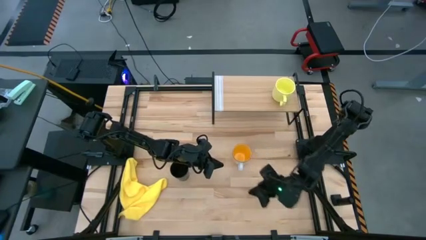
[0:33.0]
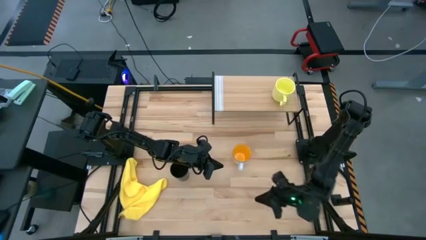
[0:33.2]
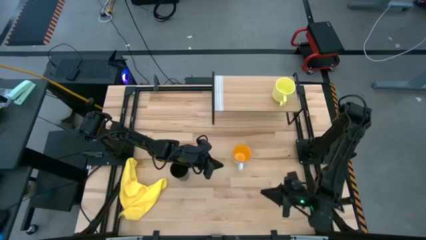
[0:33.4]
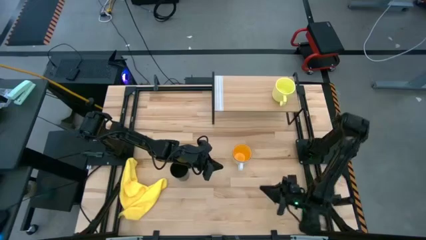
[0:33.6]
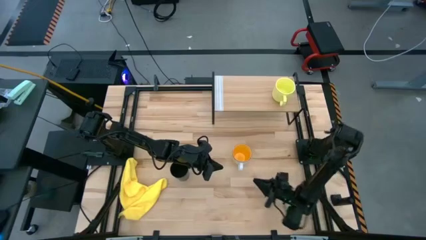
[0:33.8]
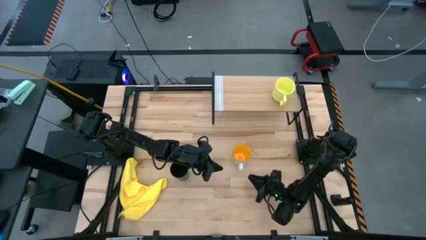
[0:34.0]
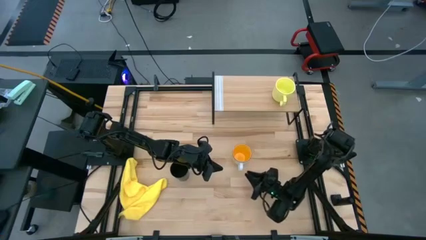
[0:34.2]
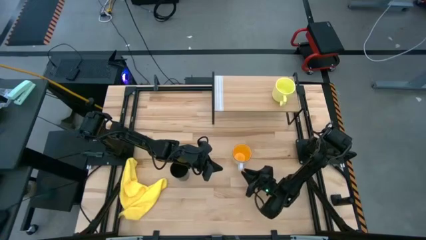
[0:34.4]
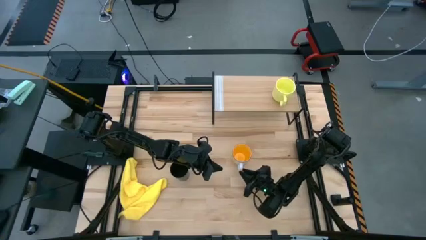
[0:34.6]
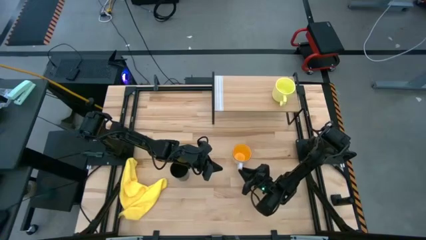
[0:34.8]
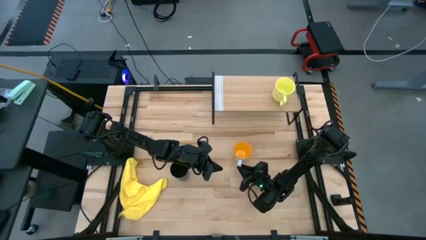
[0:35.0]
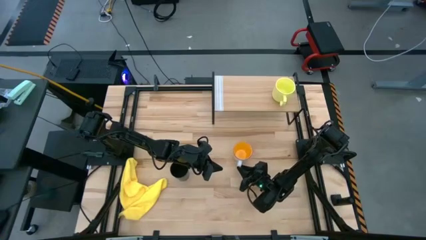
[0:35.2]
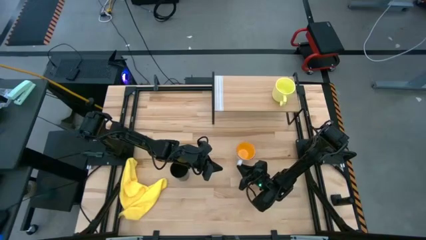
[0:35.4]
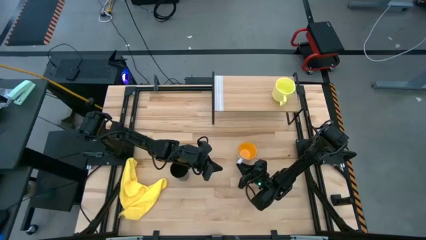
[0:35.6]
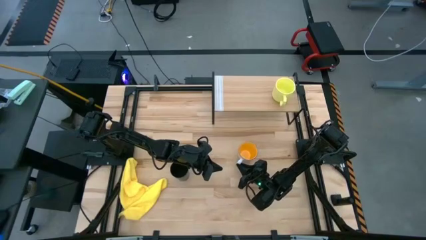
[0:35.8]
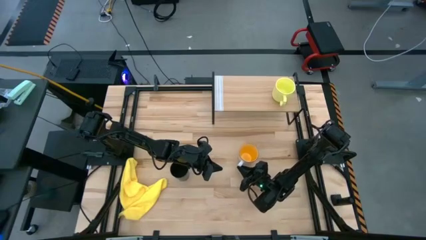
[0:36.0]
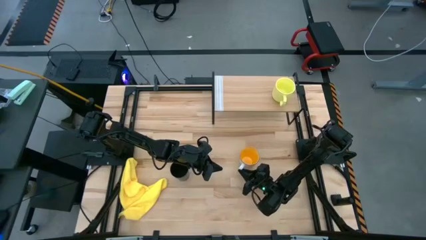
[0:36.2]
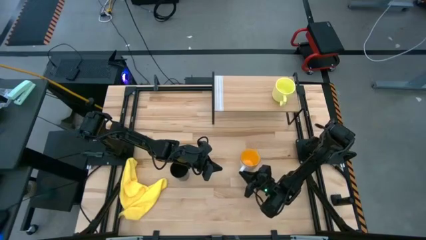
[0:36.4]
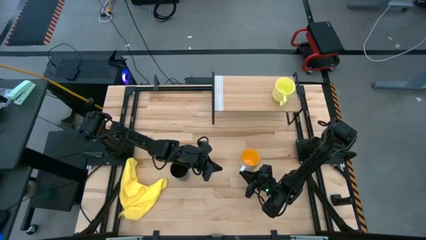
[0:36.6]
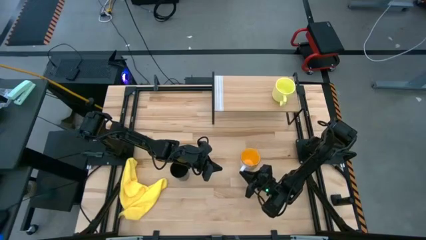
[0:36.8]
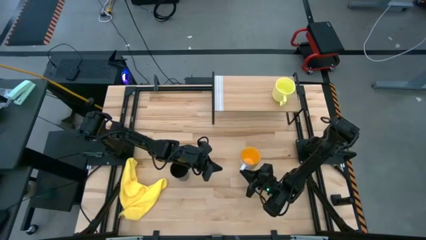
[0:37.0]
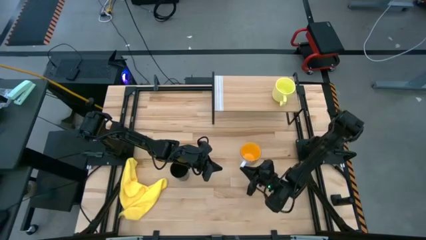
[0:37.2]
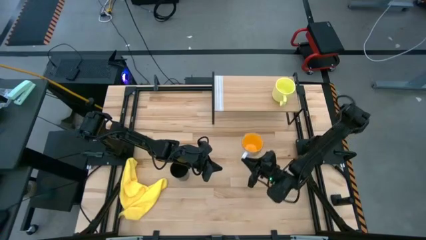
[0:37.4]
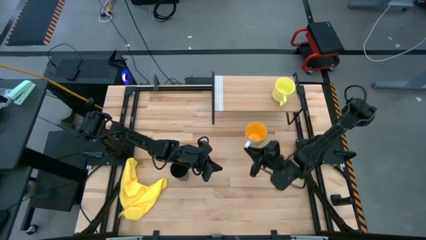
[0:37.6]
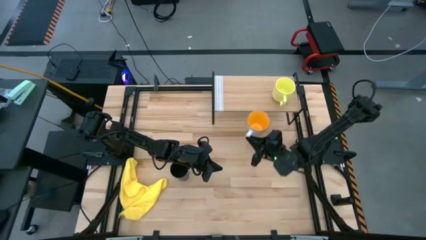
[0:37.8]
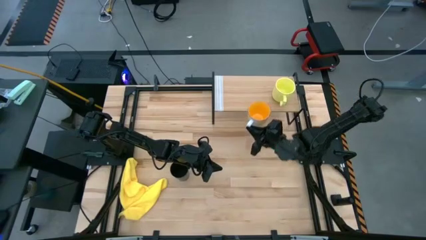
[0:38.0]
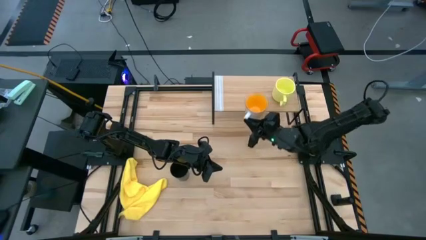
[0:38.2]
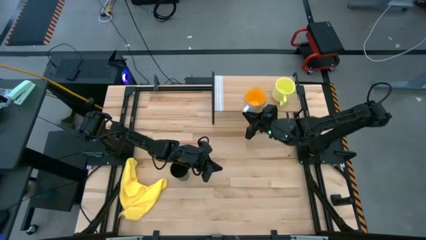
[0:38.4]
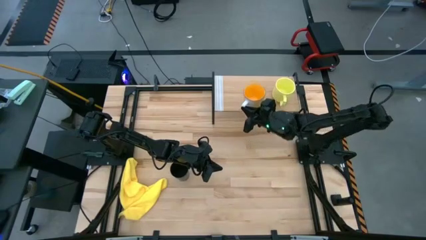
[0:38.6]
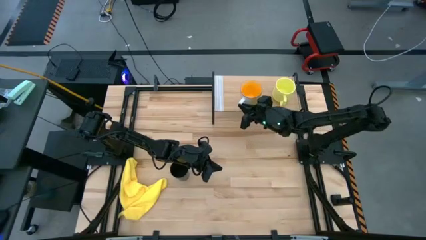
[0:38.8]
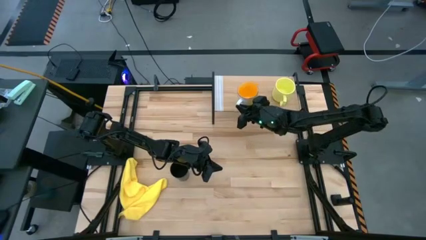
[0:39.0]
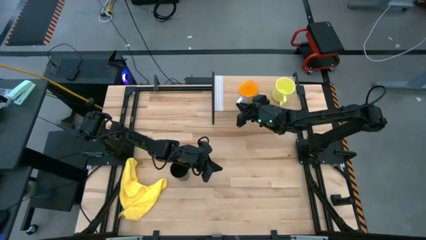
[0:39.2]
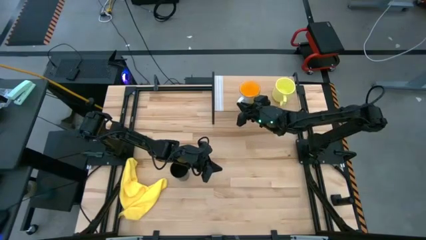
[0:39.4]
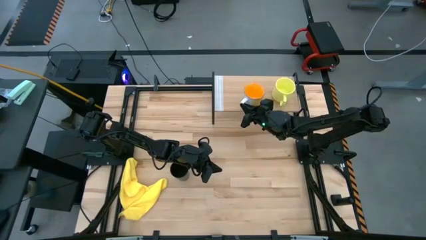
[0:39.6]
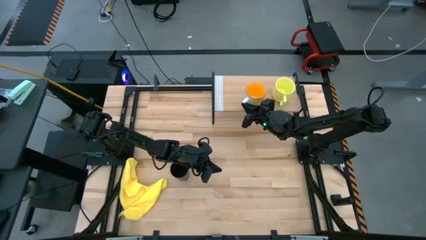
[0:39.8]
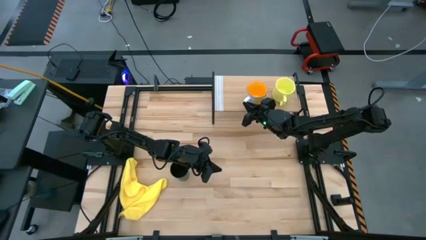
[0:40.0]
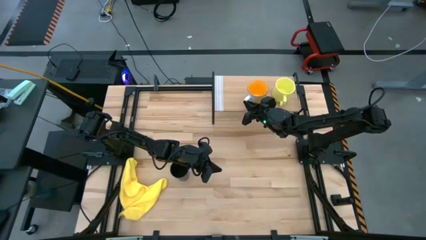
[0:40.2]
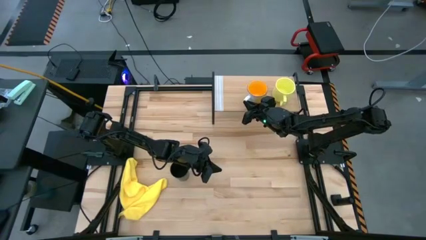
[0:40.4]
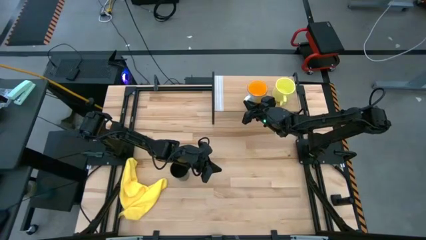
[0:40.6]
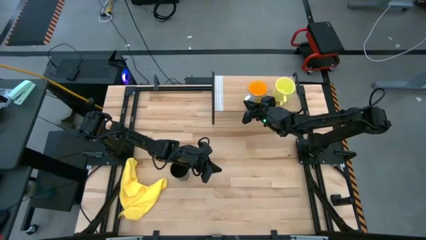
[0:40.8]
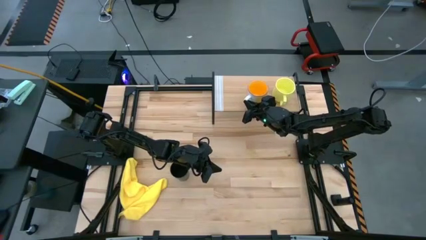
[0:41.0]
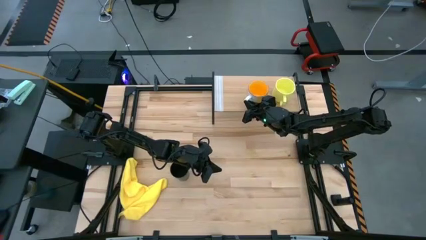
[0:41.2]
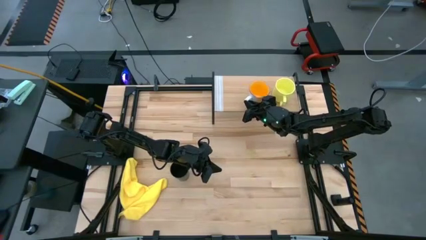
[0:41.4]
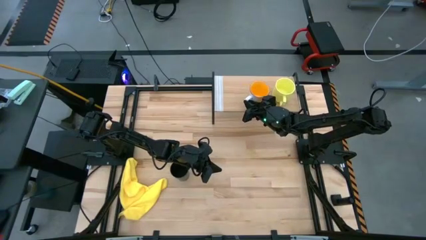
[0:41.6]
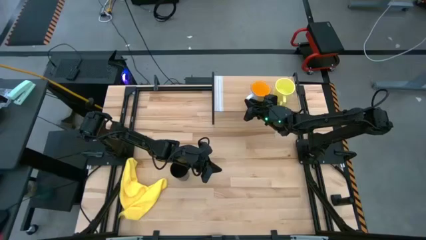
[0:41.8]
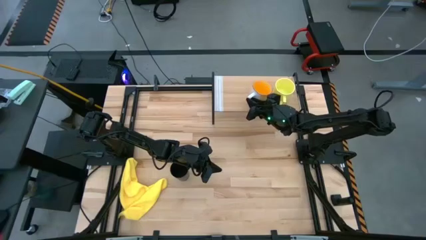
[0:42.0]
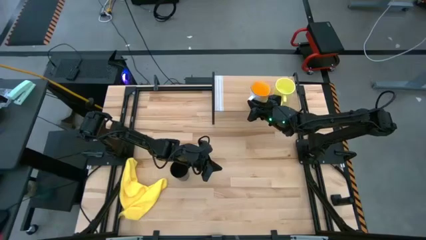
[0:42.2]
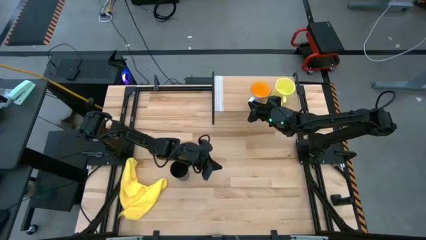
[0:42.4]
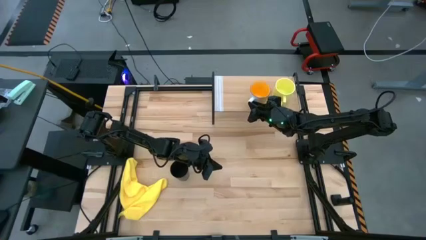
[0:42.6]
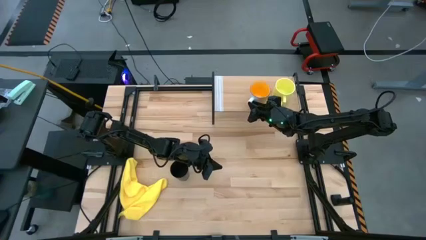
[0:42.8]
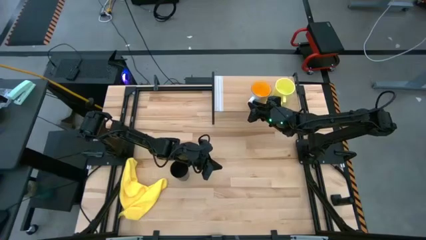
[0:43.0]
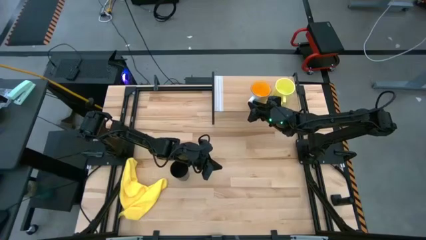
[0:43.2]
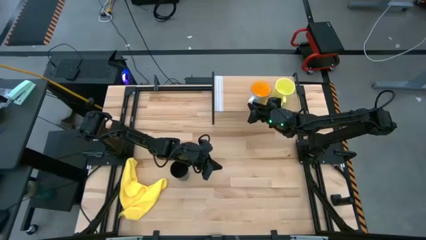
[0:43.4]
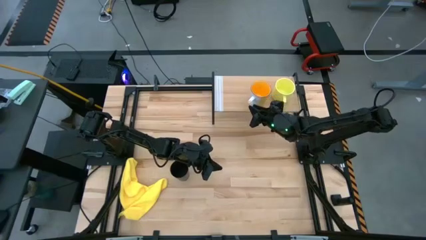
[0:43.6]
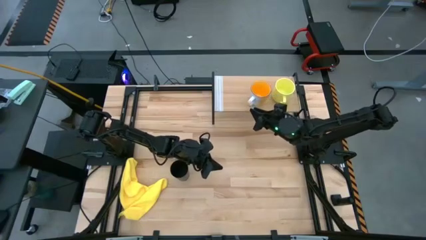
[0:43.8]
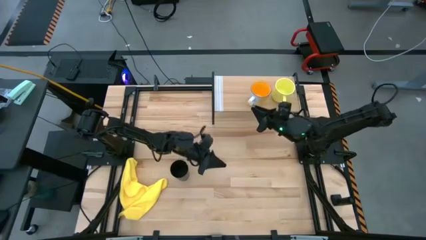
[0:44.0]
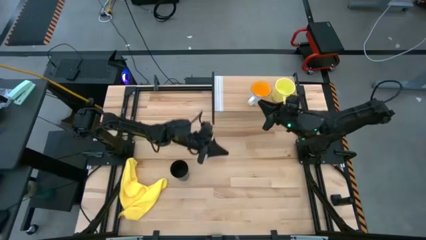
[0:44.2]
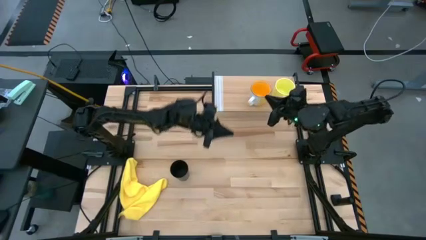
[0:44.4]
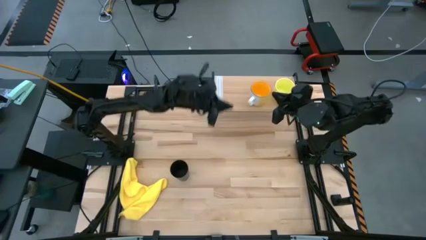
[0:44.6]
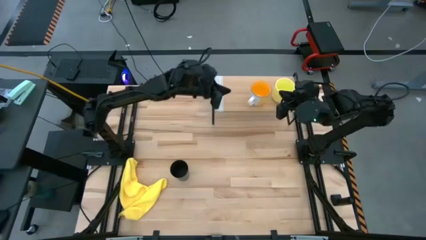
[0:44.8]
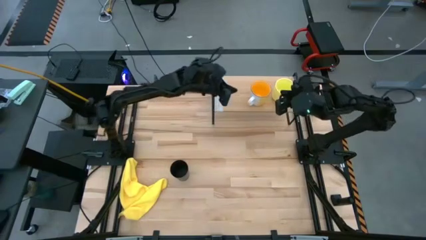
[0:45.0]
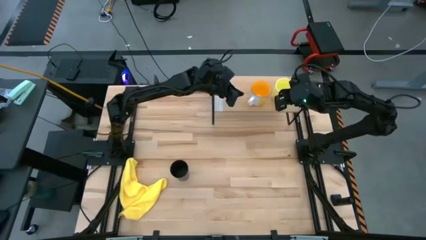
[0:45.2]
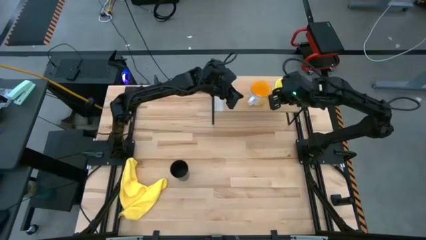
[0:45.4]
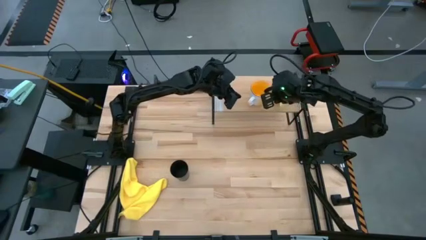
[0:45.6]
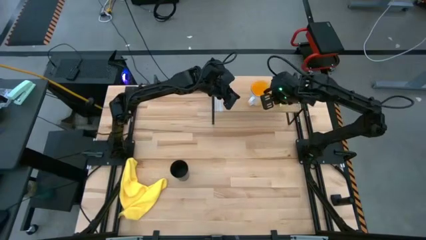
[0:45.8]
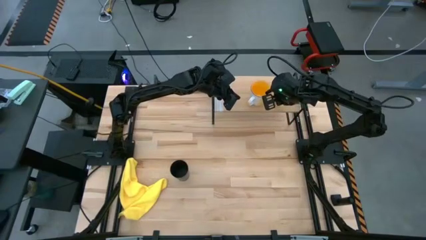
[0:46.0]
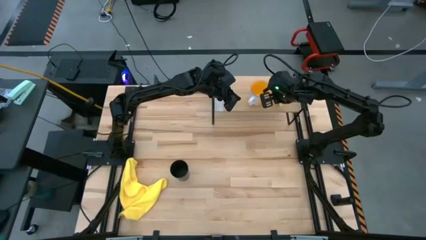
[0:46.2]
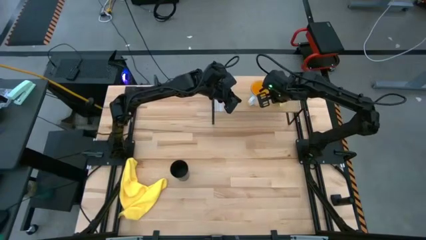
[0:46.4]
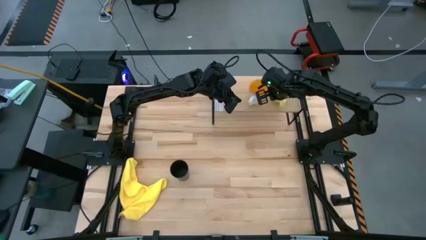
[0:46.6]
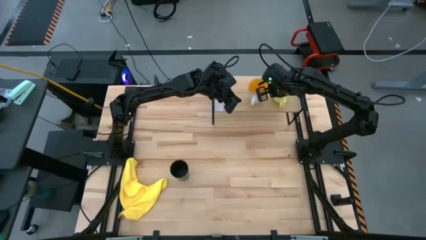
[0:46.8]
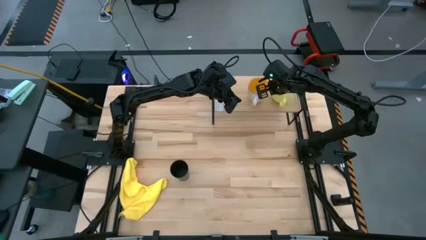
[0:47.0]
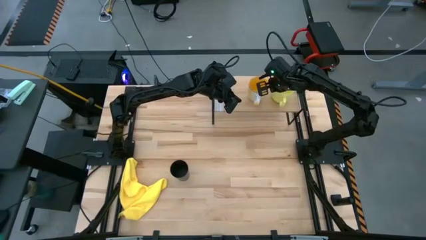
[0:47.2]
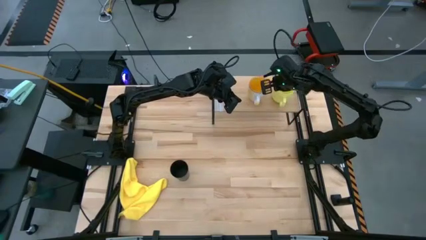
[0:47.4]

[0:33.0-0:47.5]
Task: Stack small to large cups/mugs on shelf
Put the yellow mug on the shelf
